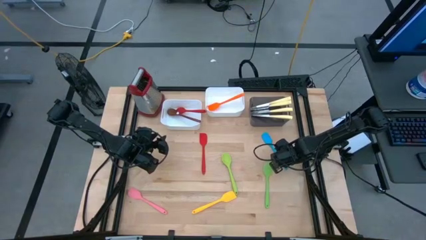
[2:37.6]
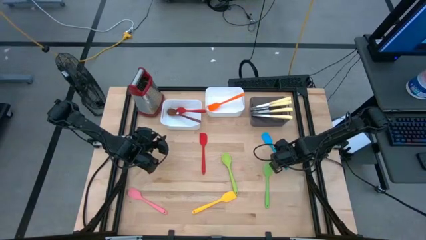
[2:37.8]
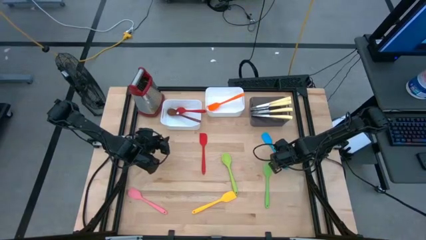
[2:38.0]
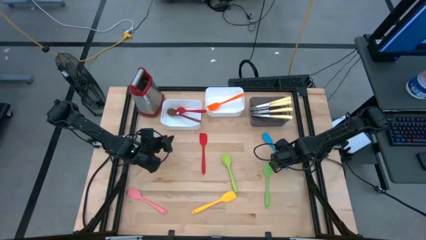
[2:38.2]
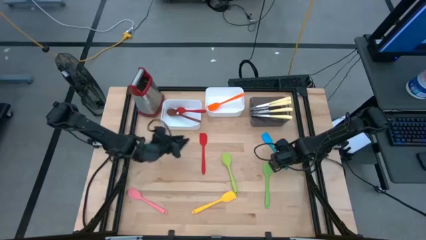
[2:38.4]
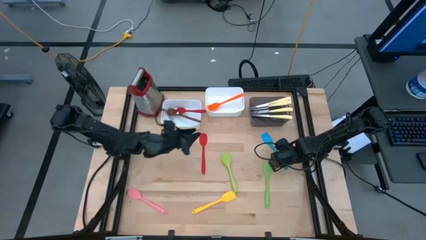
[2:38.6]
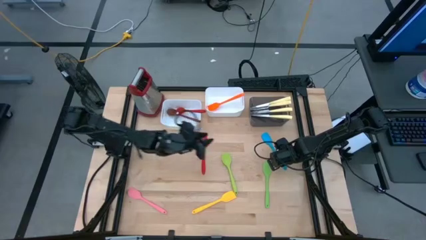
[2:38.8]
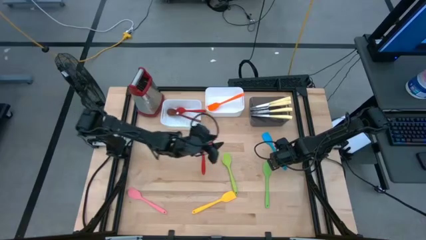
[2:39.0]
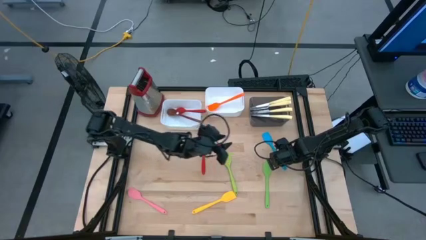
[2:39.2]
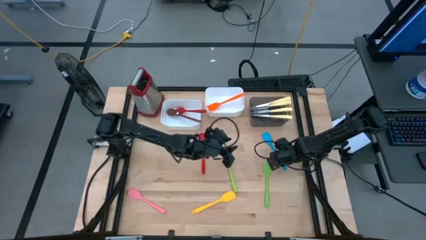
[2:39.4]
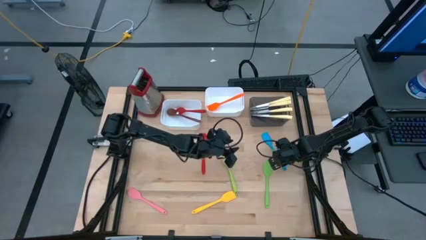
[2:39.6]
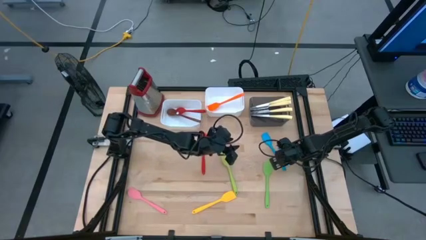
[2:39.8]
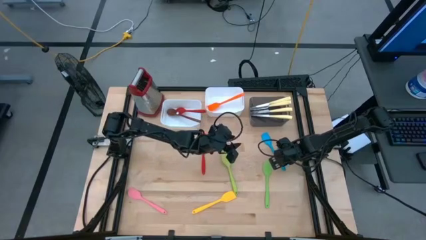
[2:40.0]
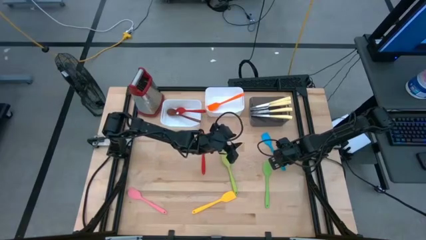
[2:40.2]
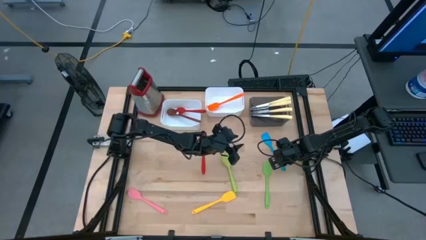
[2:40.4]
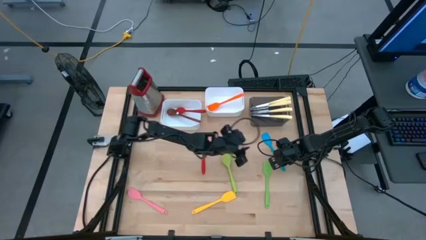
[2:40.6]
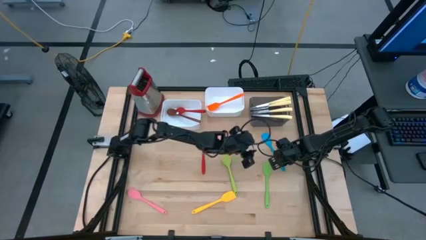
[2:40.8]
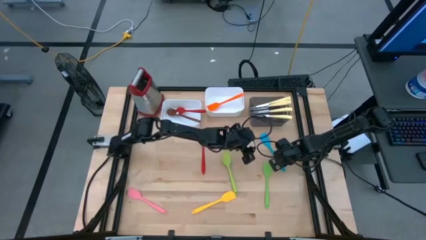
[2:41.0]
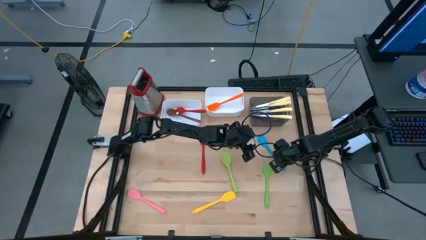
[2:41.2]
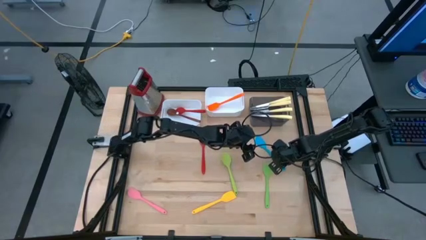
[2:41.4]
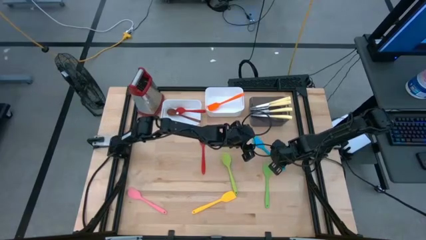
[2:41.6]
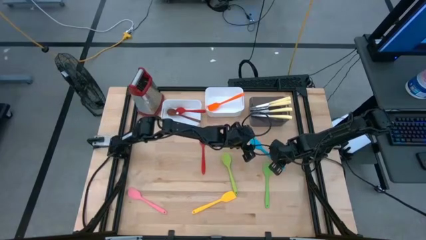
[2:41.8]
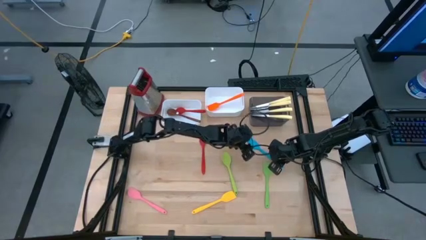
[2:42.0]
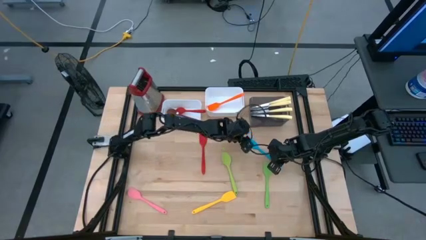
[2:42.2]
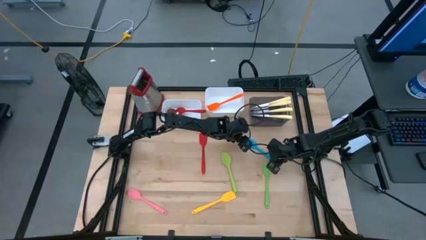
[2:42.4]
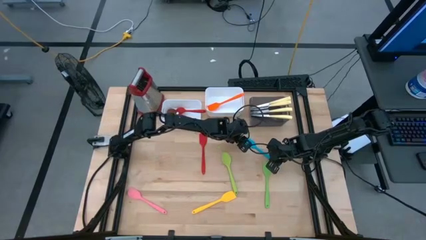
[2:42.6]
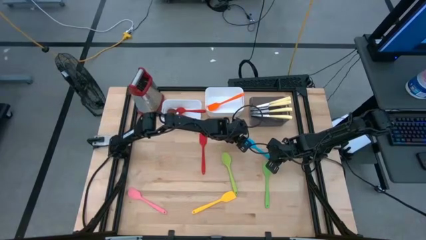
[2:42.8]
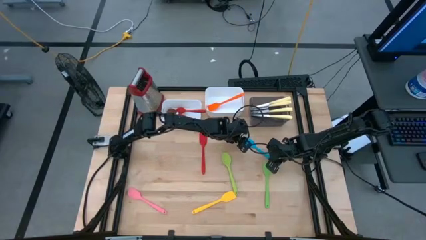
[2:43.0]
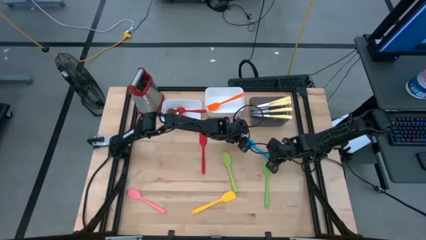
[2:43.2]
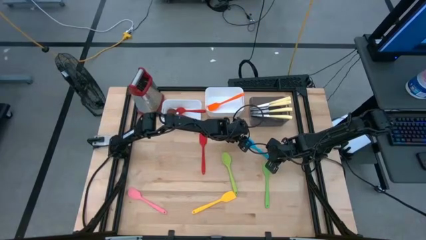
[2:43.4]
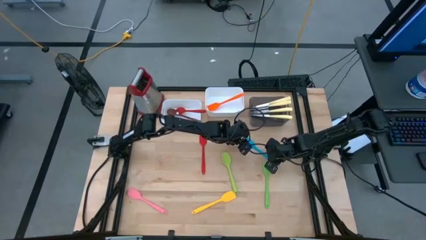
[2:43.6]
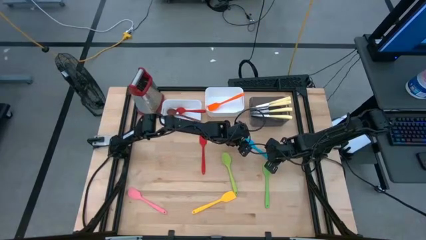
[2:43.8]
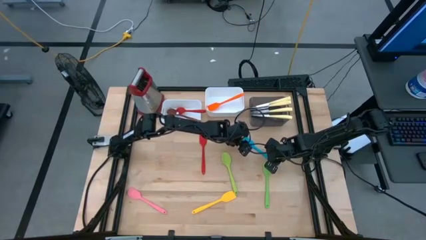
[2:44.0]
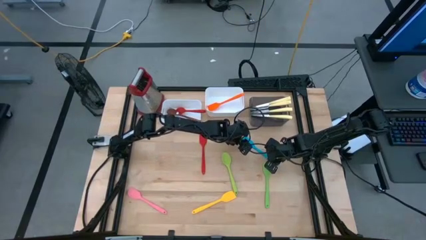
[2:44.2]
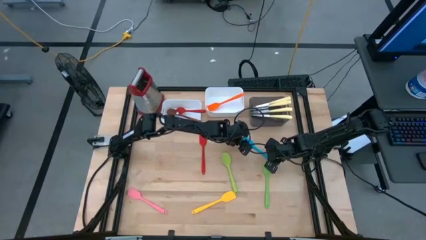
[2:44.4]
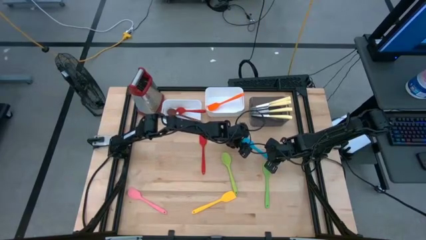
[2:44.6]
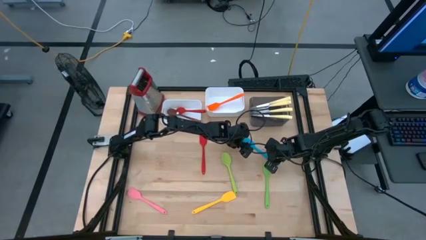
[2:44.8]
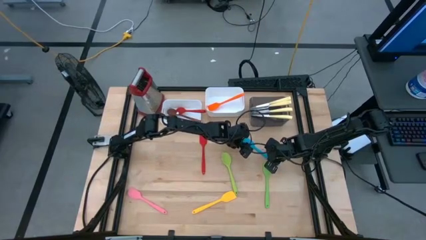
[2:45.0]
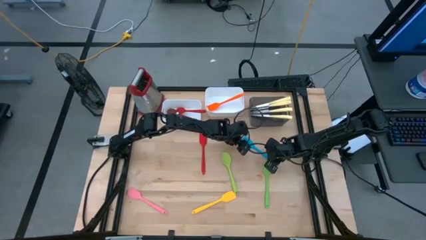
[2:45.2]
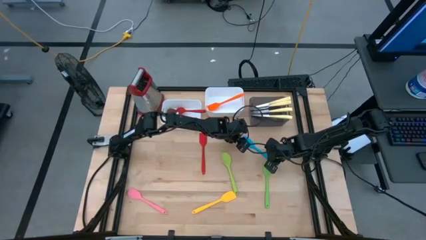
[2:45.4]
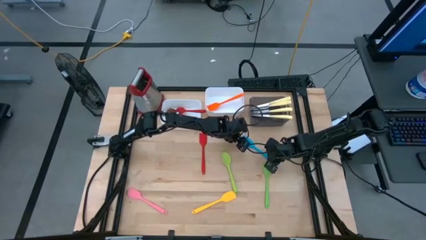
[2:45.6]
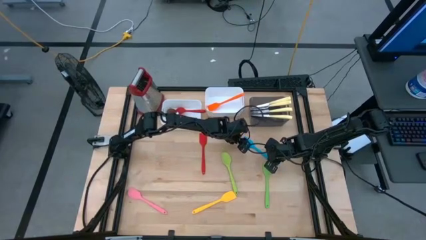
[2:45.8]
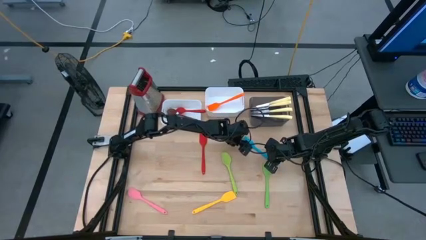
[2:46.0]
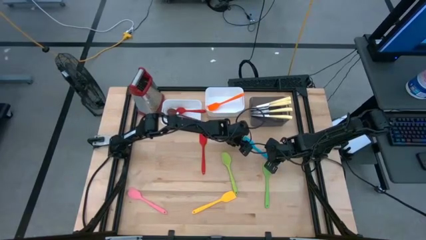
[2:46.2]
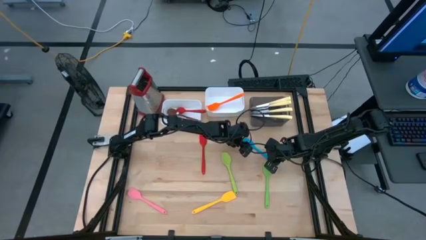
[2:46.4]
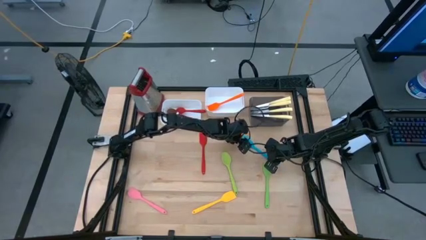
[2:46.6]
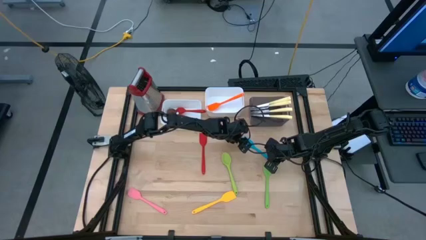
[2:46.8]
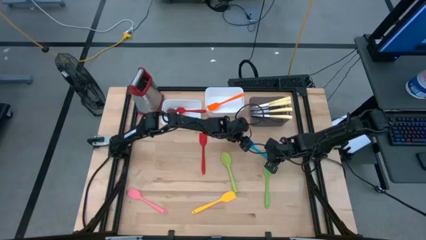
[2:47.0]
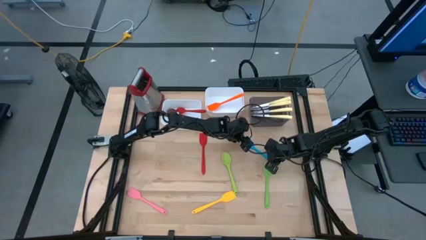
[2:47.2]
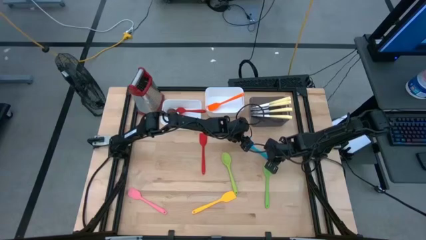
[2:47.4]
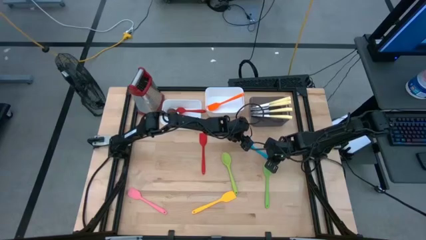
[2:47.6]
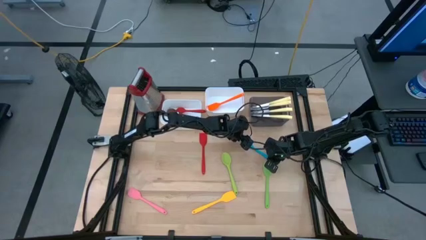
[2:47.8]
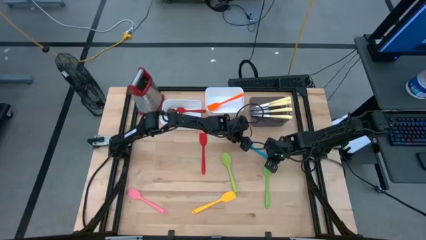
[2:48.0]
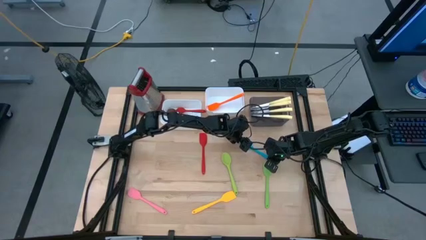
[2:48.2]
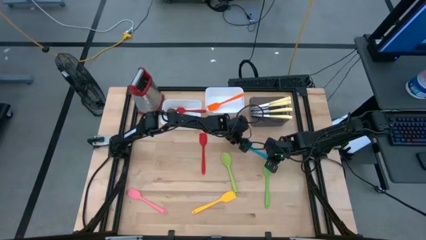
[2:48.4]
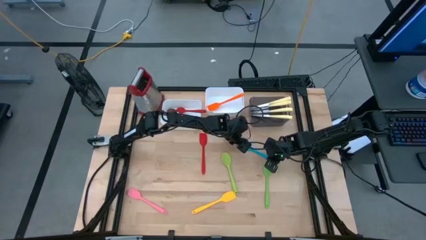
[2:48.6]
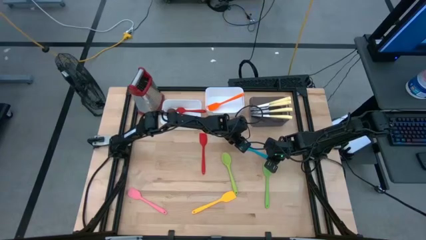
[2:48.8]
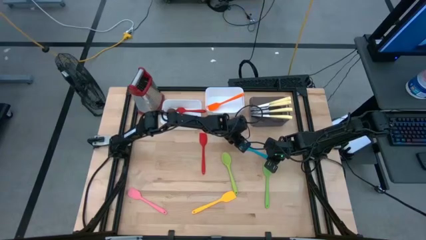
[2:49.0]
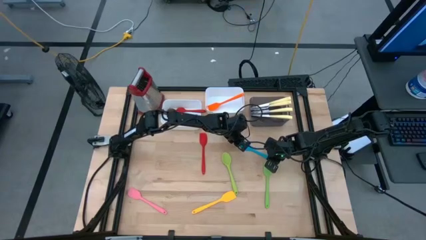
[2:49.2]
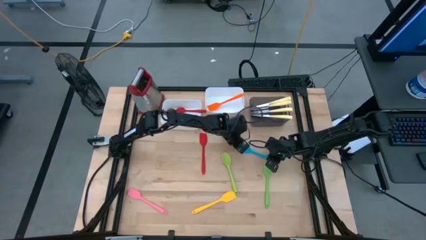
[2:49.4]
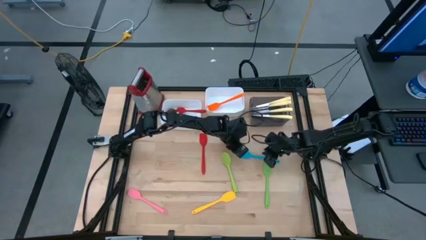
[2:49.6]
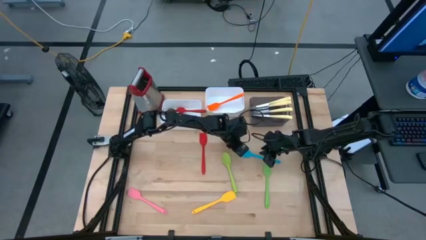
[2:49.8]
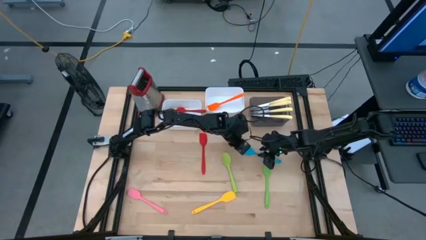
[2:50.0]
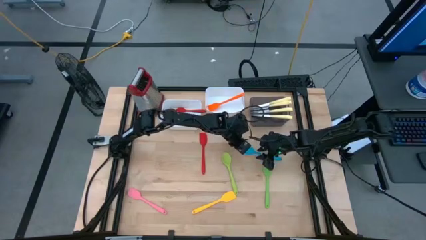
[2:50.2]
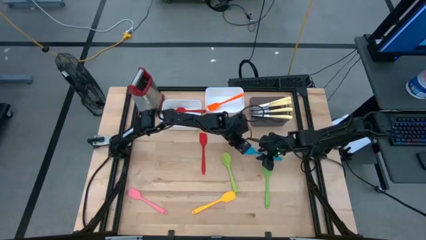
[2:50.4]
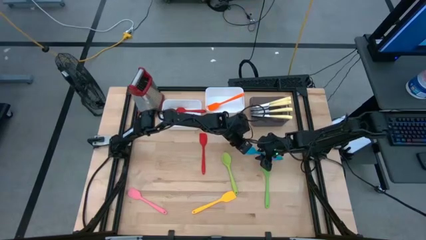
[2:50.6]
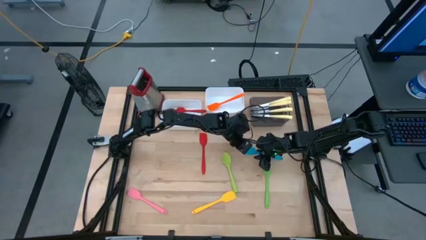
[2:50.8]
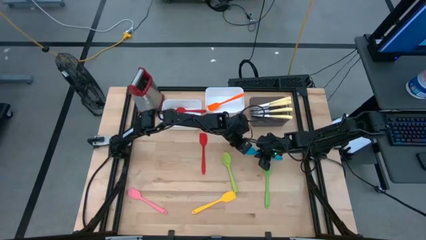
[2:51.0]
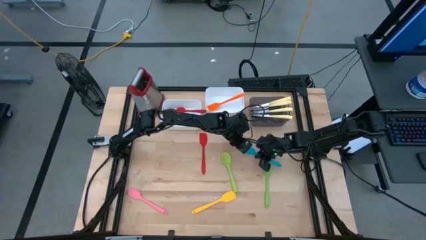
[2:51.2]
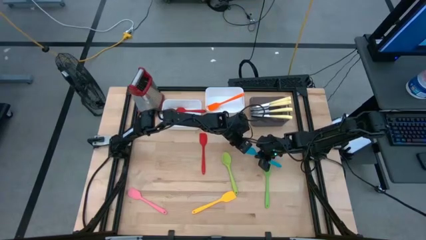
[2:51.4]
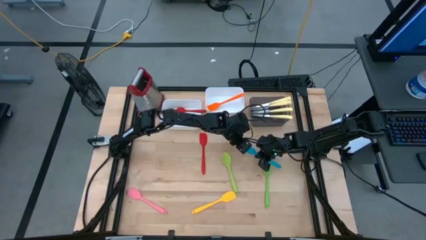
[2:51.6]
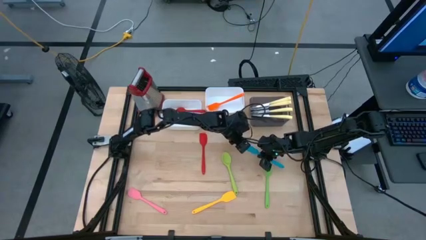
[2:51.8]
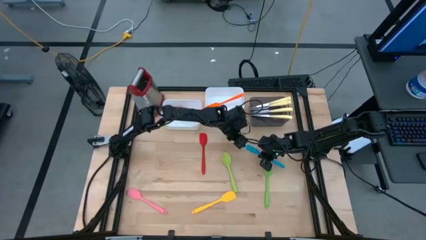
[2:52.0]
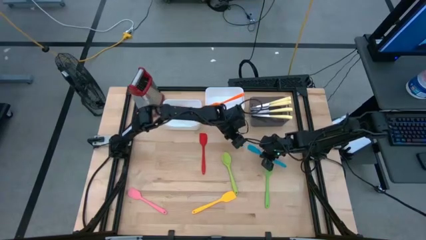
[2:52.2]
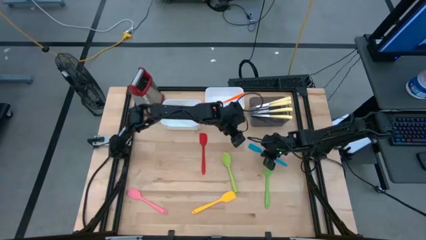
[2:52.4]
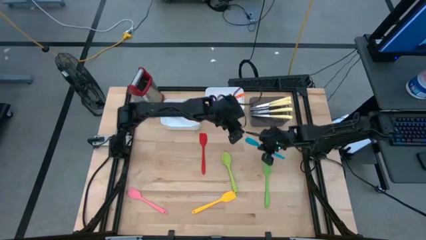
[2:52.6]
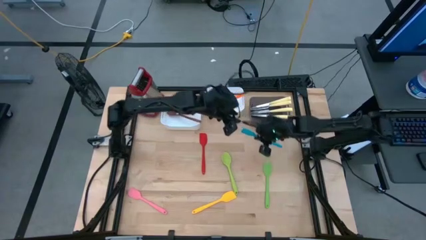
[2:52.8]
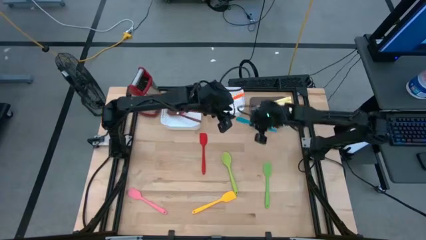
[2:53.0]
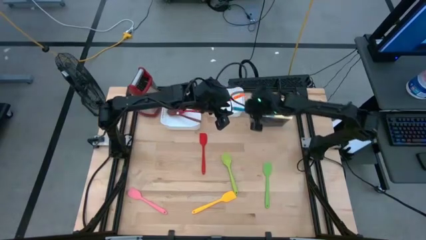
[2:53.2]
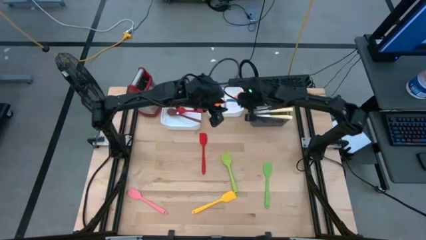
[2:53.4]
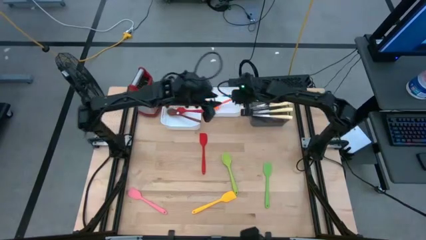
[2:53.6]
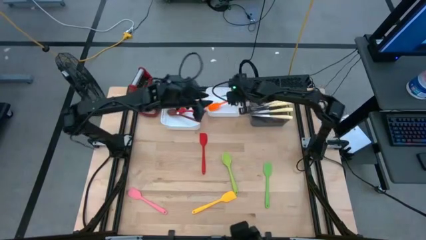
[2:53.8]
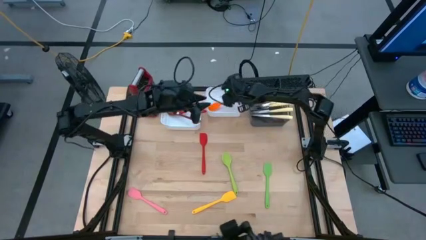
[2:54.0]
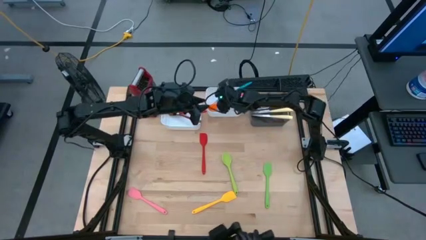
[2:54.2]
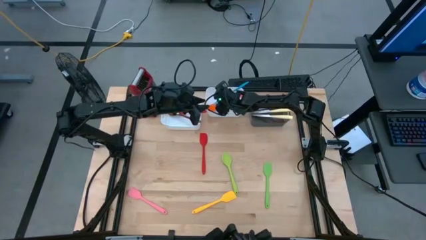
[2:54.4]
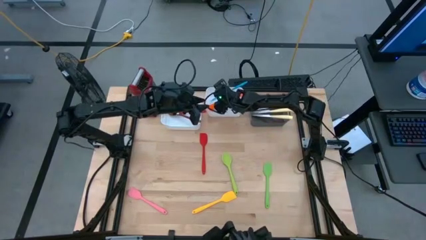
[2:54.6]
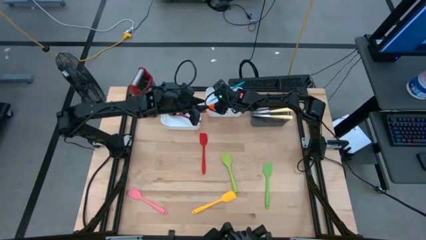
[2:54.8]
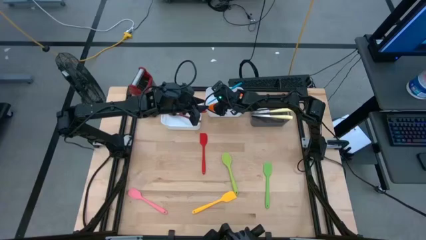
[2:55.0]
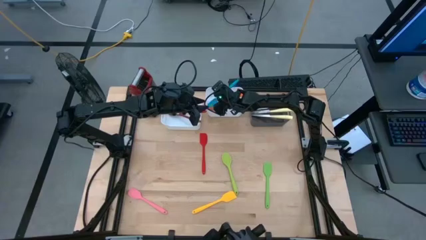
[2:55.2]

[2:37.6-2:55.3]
Task: Pick & Place Kitchen Items
Put the blue spatula into the right white bin
